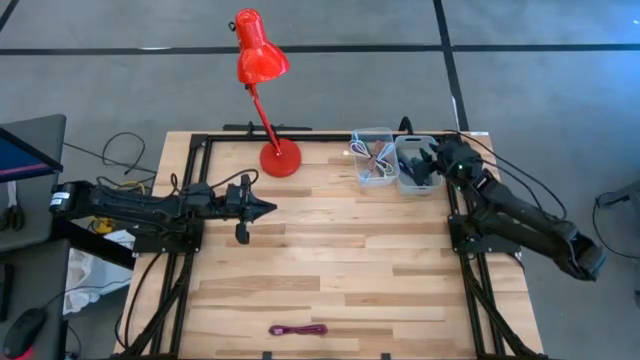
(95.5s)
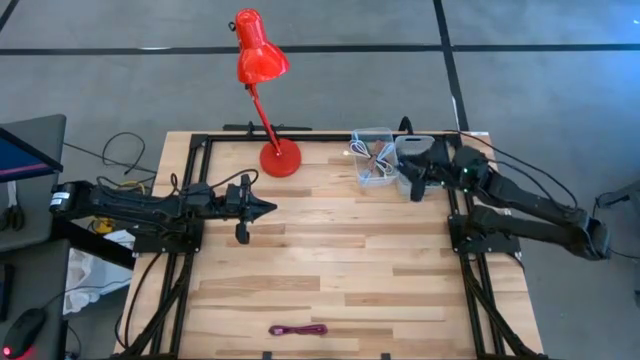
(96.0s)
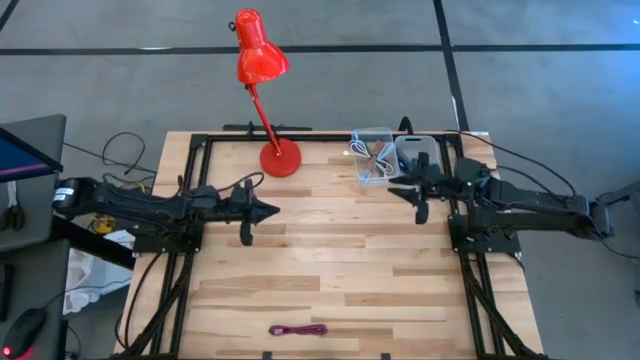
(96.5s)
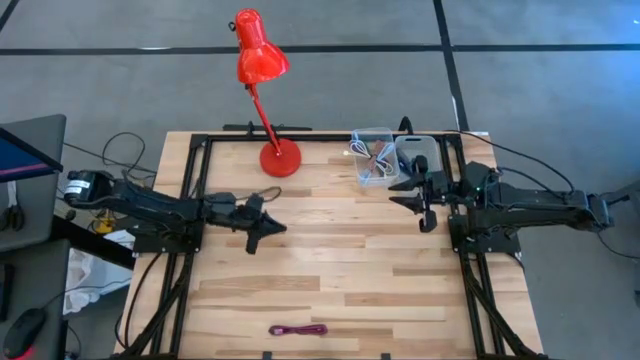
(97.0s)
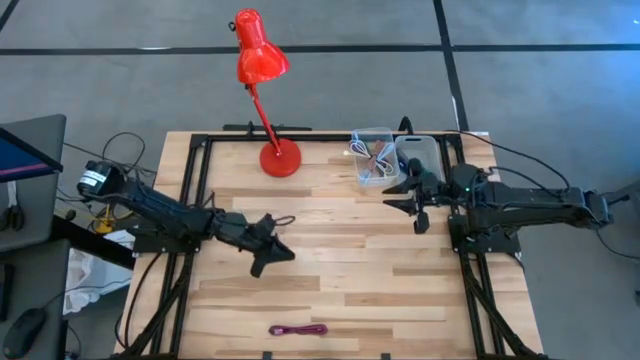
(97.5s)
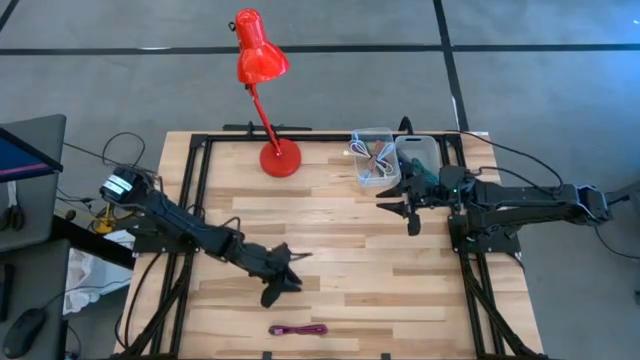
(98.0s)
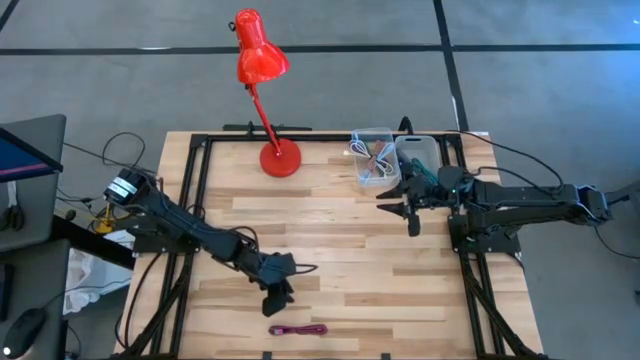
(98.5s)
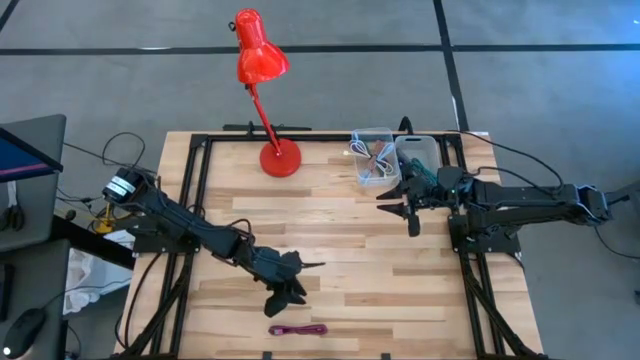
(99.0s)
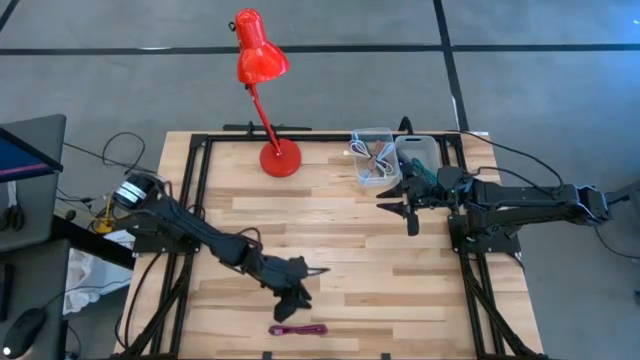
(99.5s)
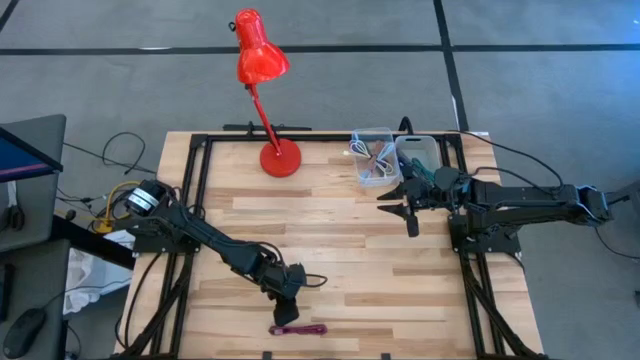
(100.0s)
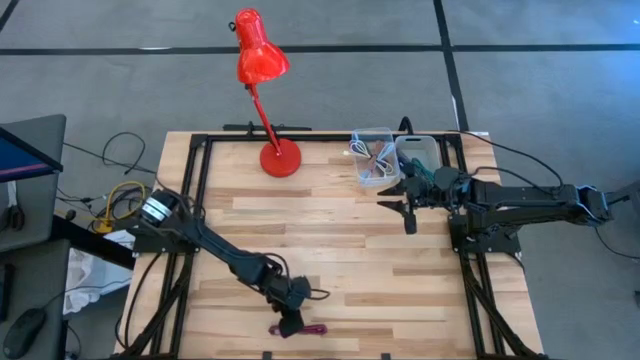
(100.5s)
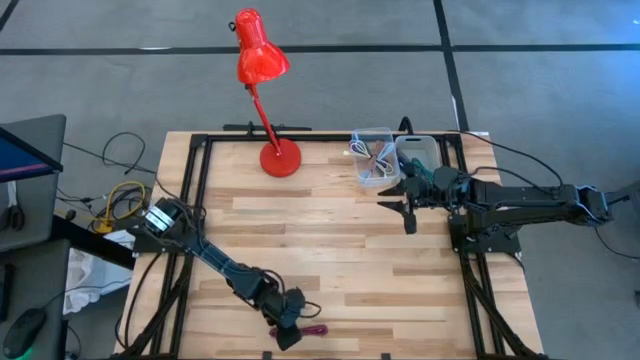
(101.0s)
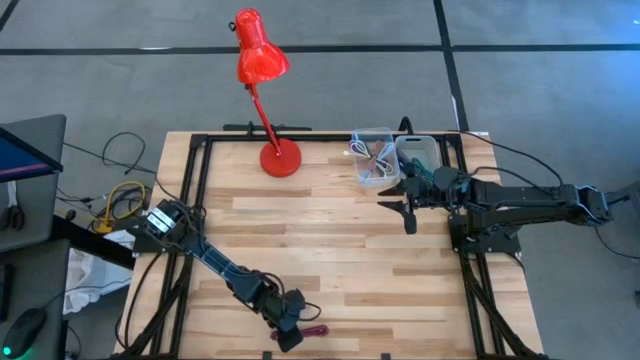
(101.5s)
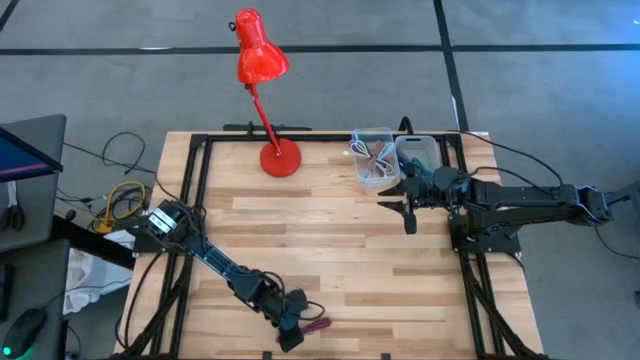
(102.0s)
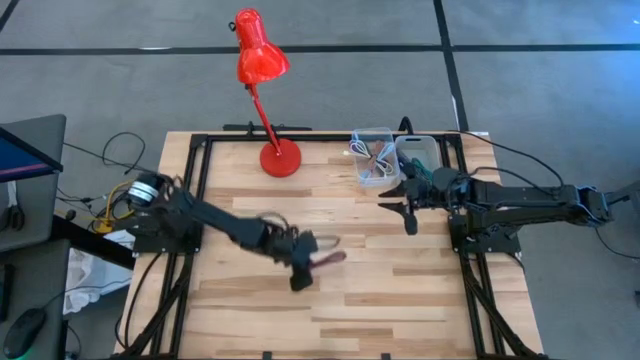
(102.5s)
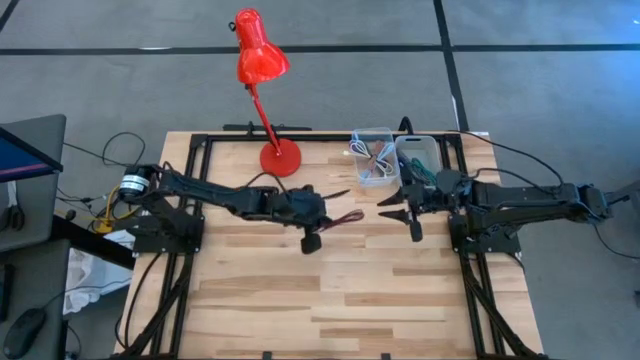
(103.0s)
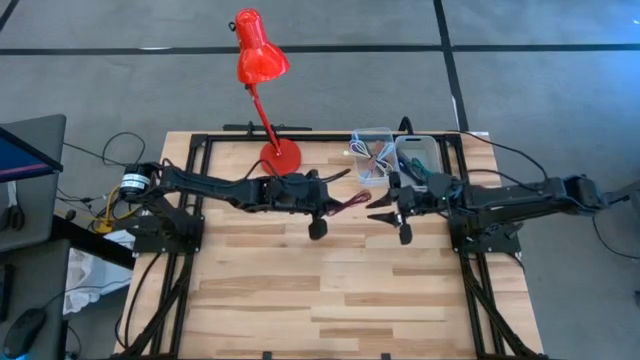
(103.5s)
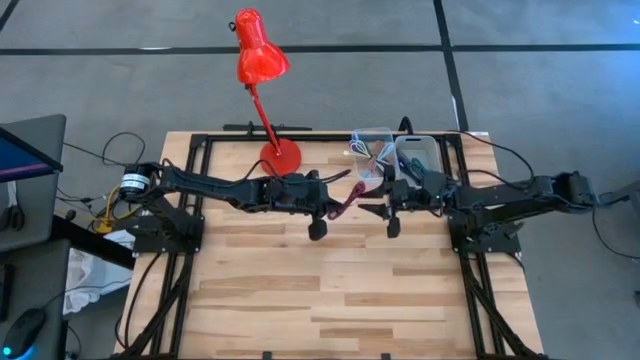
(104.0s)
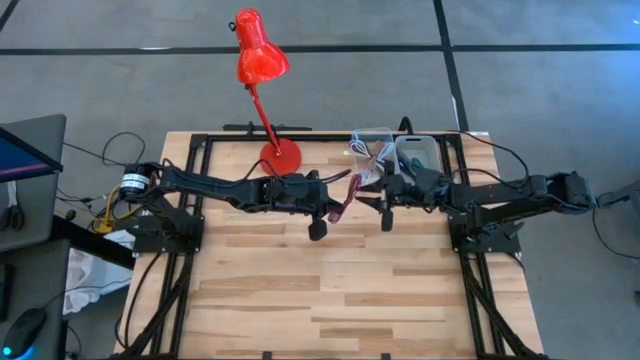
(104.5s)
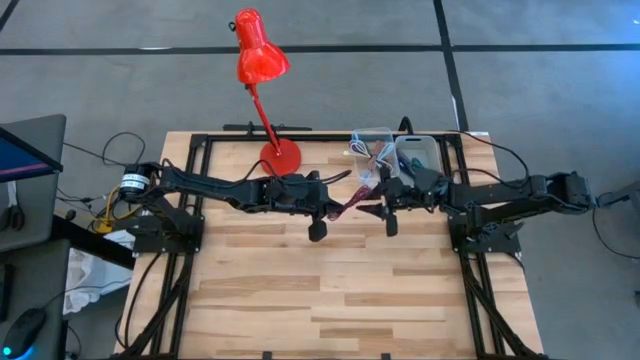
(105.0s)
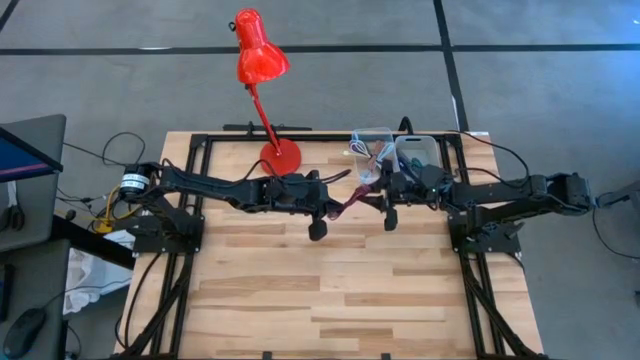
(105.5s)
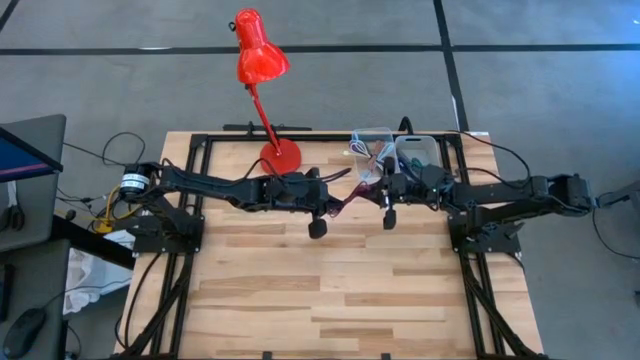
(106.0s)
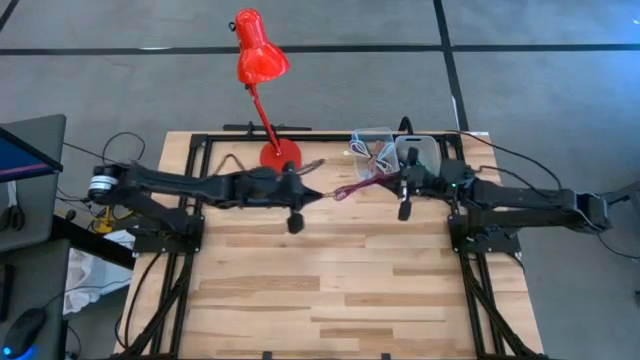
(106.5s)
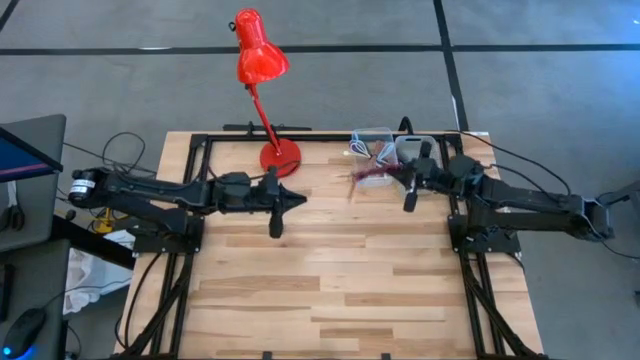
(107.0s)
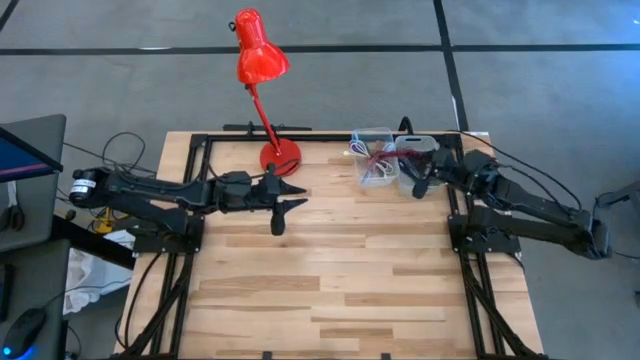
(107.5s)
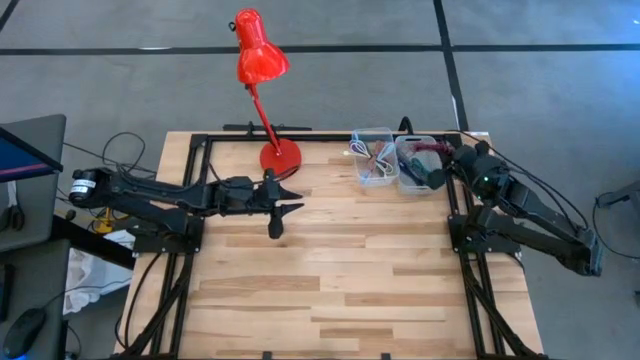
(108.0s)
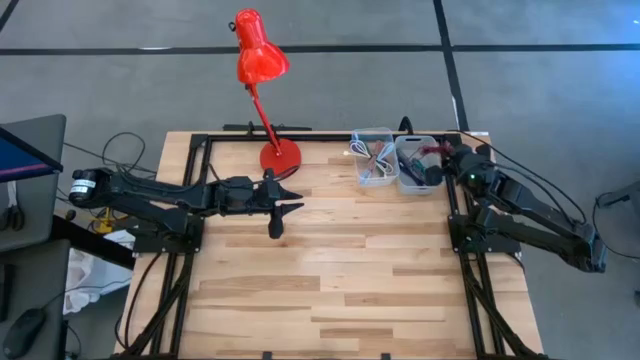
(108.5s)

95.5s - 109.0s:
Task: Pick & Place USB Port
Put the black and pink charger cable into the gray bin

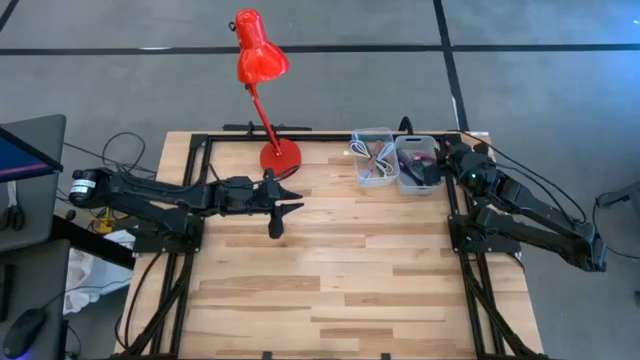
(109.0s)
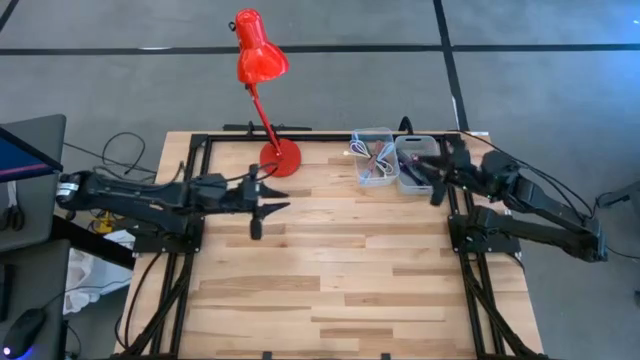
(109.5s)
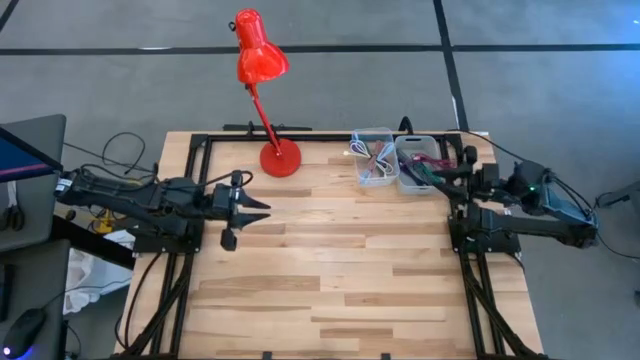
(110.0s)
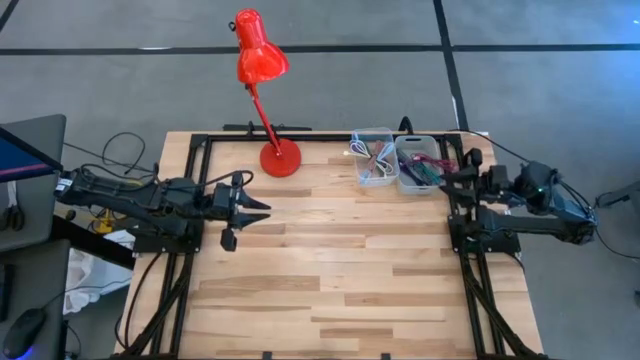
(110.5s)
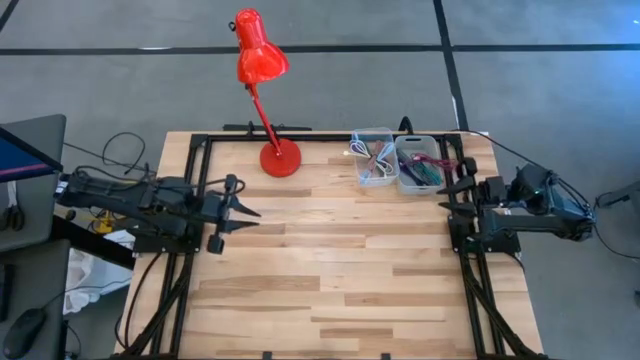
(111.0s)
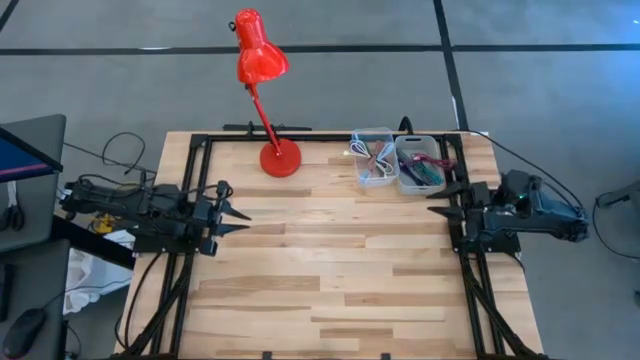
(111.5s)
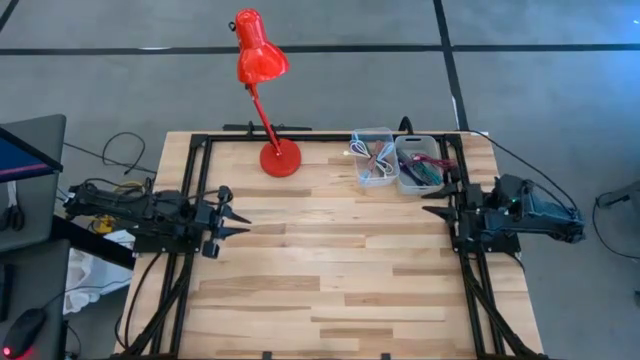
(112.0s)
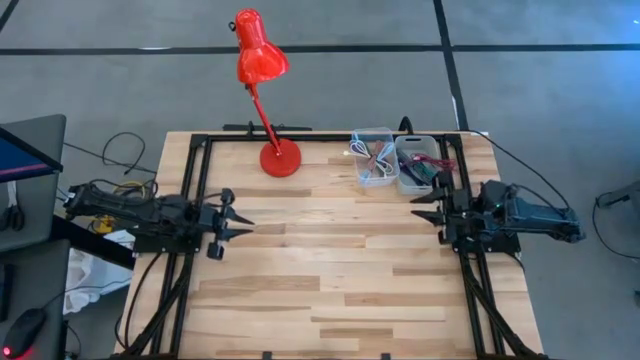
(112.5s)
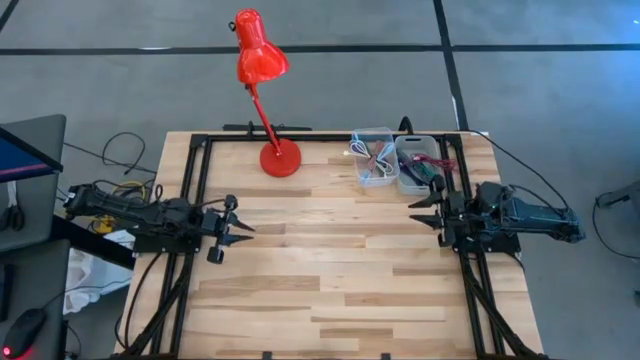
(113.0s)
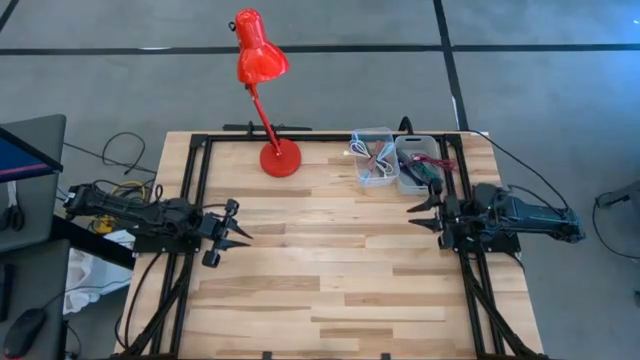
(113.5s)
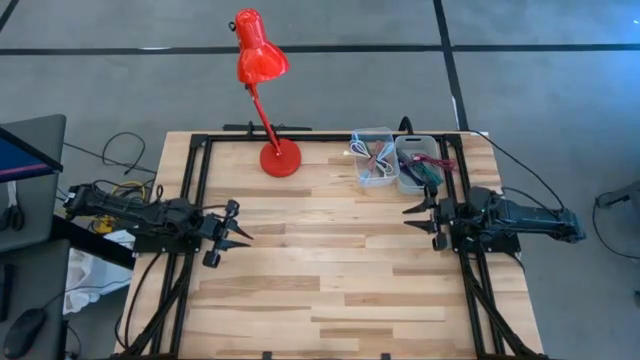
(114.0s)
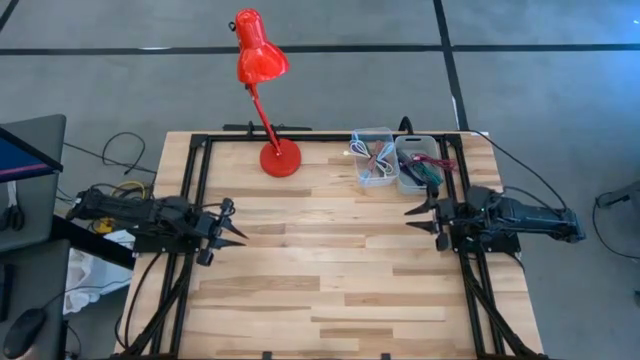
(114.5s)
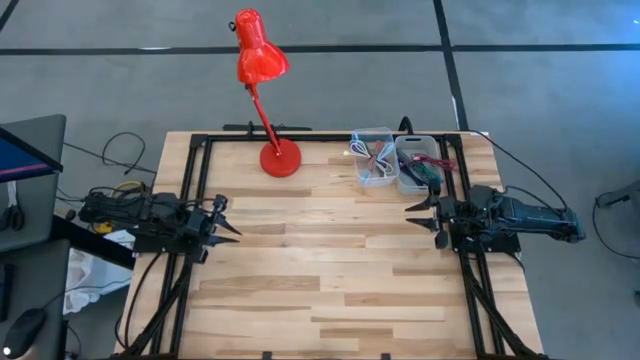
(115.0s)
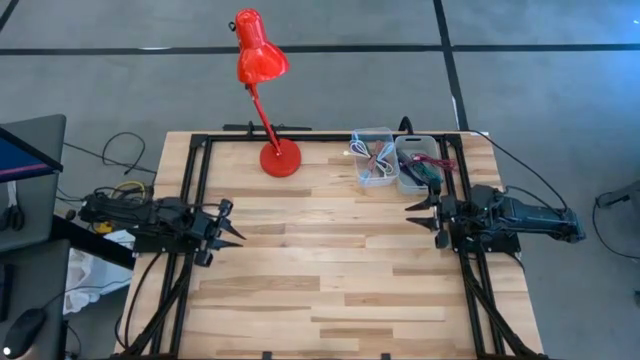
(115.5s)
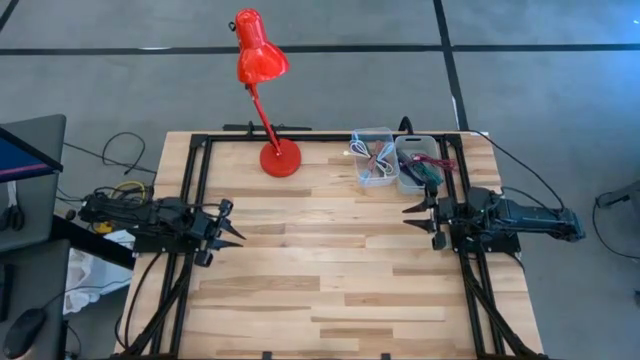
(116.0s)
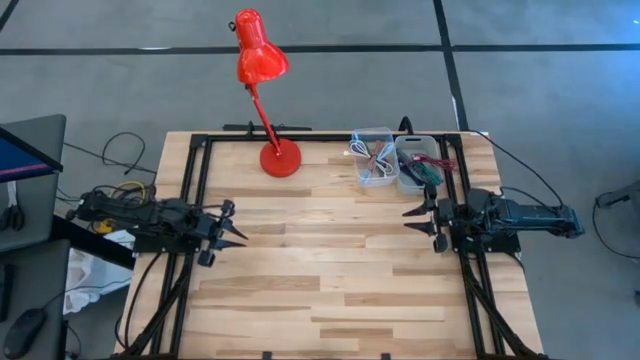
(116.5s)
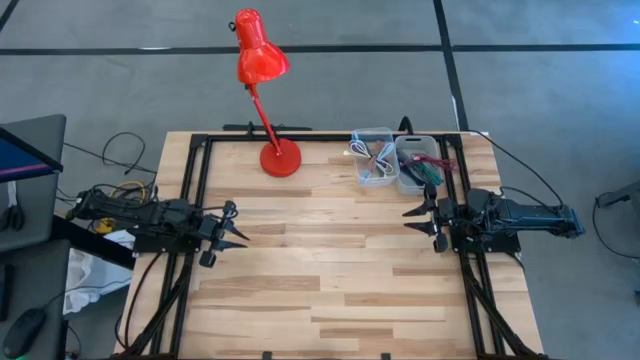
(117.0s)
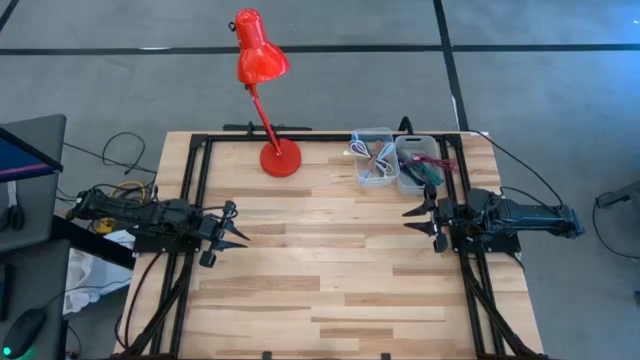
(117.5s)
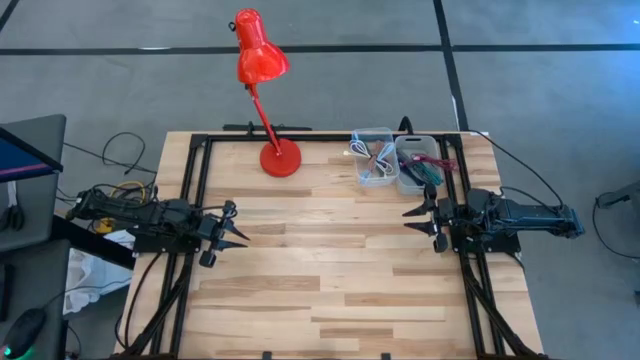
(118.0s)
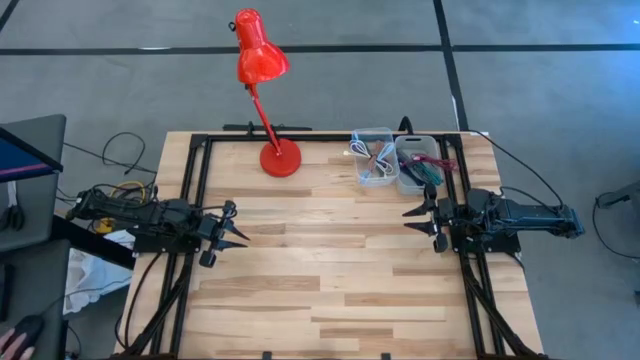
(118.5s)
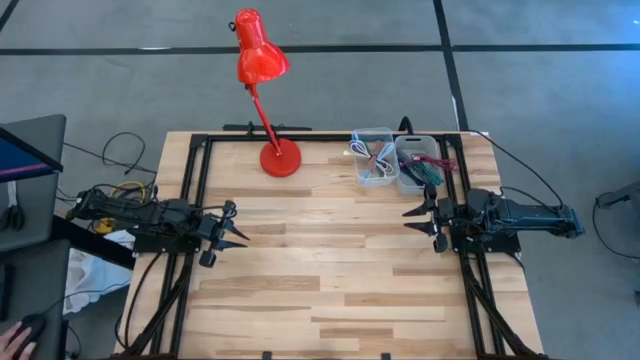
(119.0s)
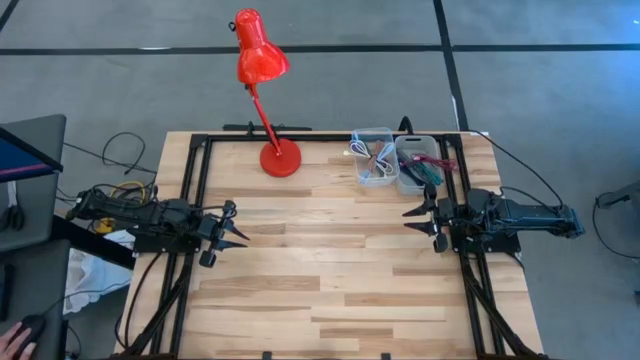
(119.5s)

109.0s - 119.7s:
Return to Home Position
